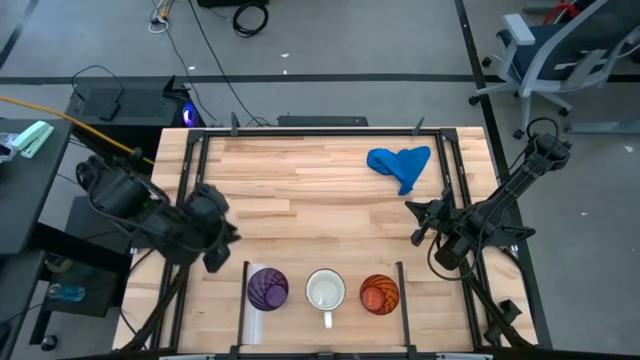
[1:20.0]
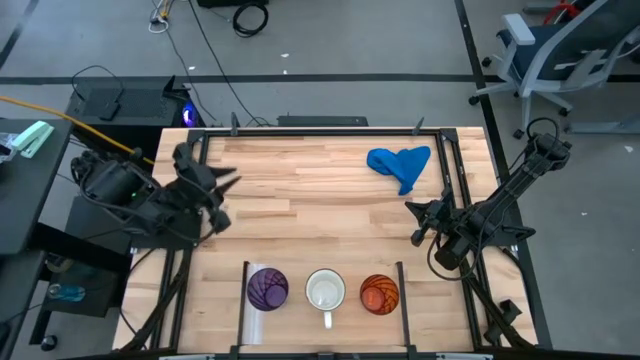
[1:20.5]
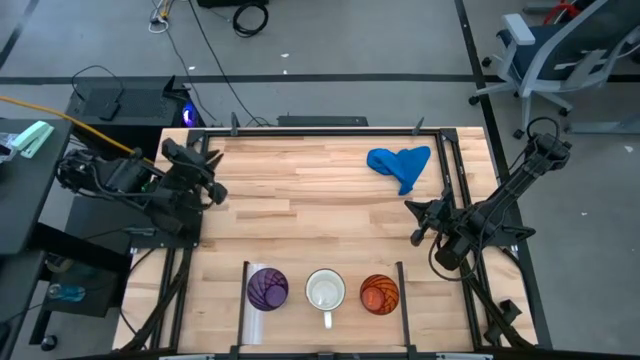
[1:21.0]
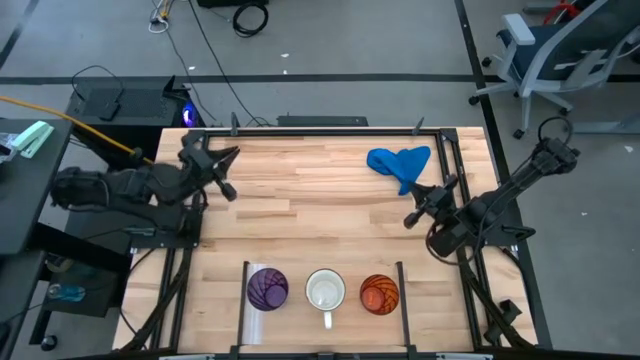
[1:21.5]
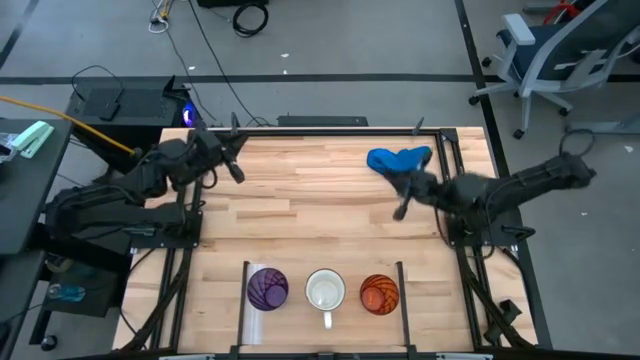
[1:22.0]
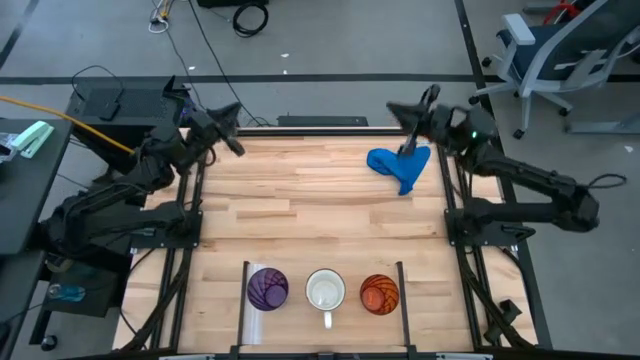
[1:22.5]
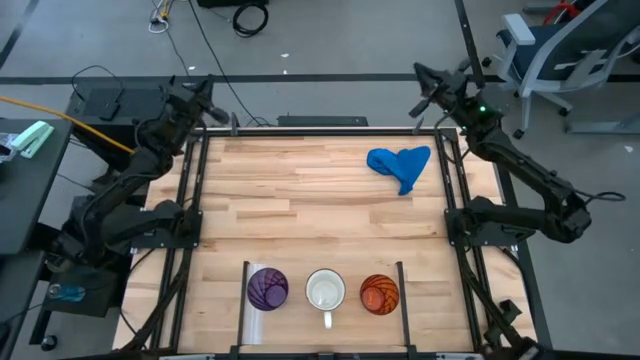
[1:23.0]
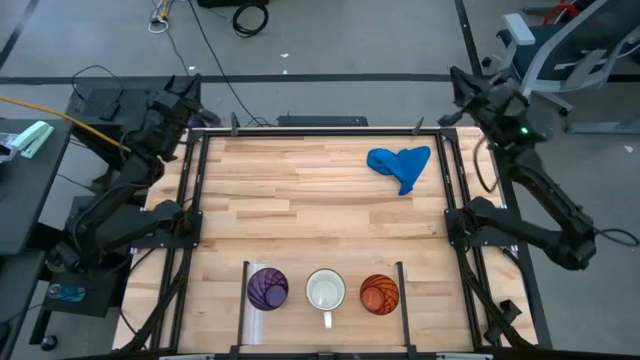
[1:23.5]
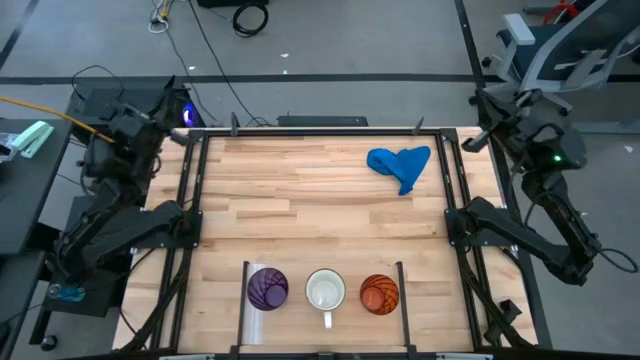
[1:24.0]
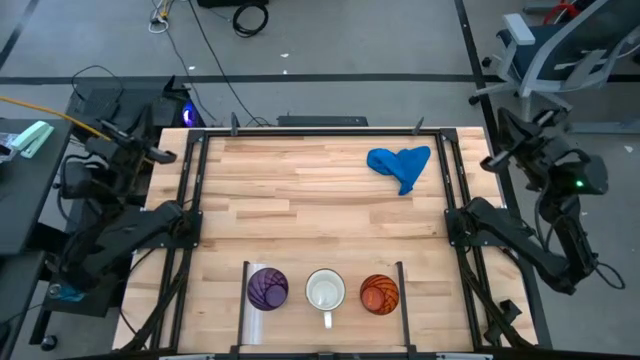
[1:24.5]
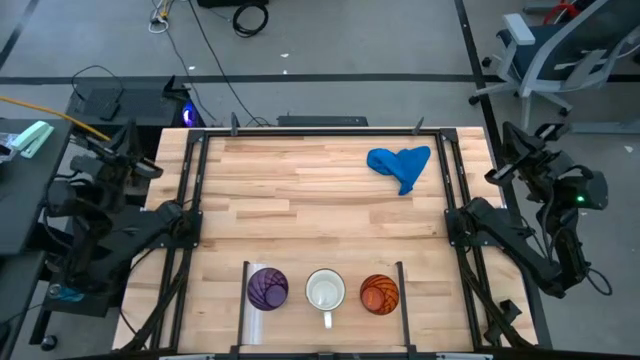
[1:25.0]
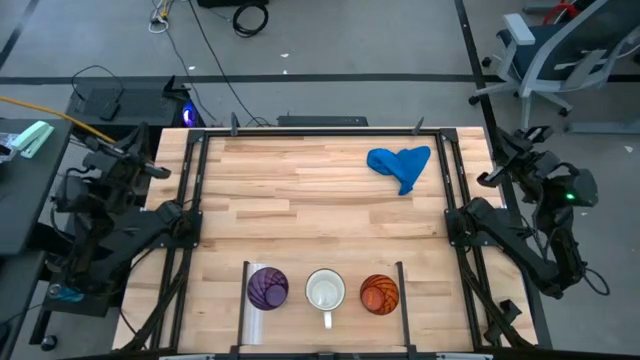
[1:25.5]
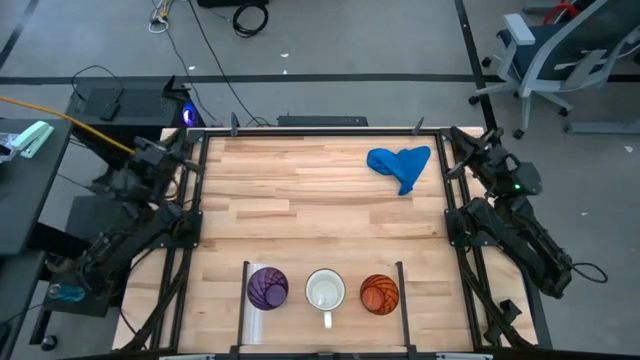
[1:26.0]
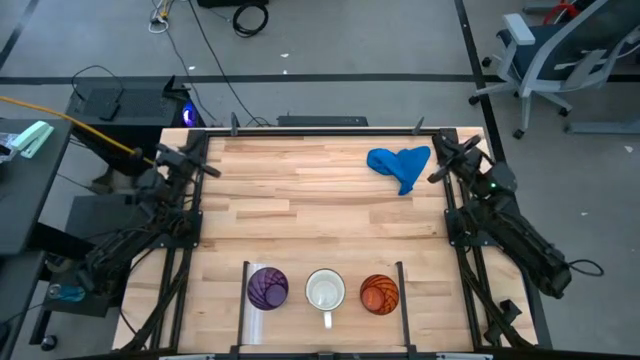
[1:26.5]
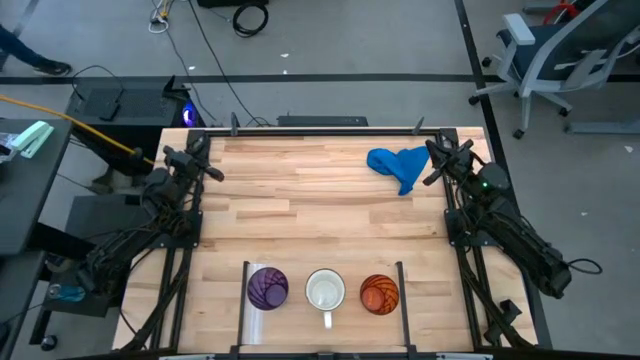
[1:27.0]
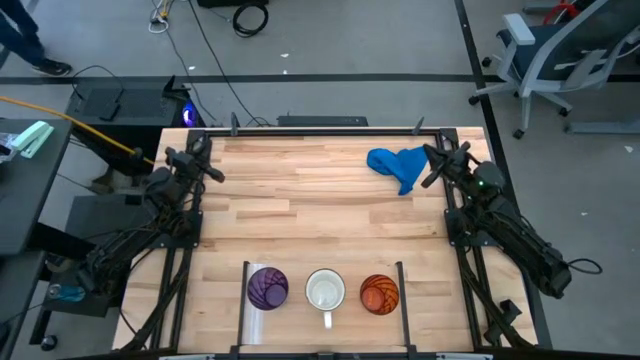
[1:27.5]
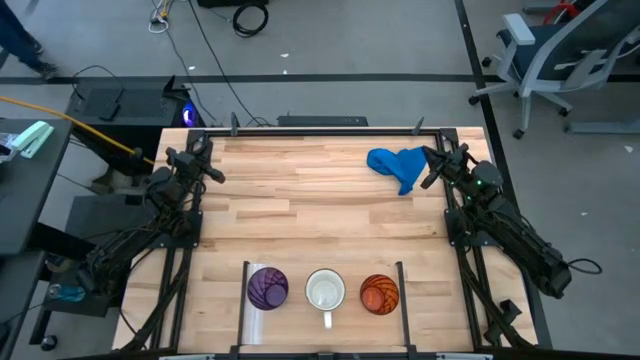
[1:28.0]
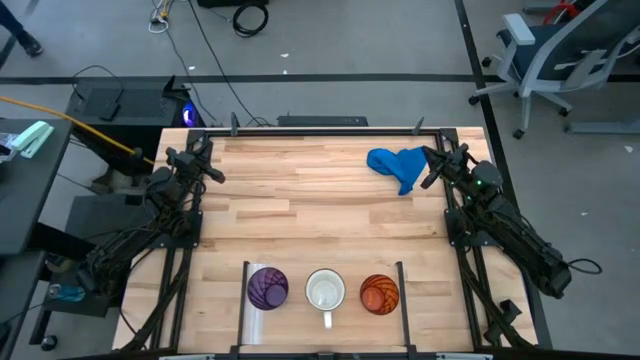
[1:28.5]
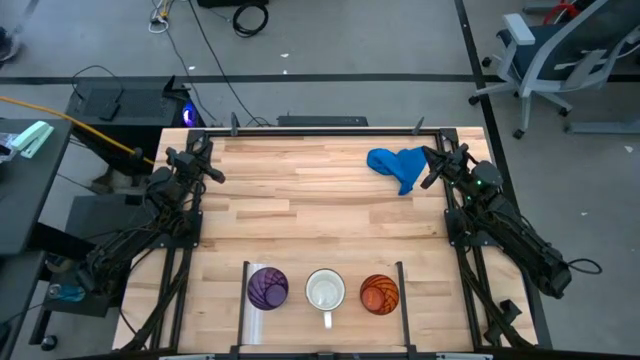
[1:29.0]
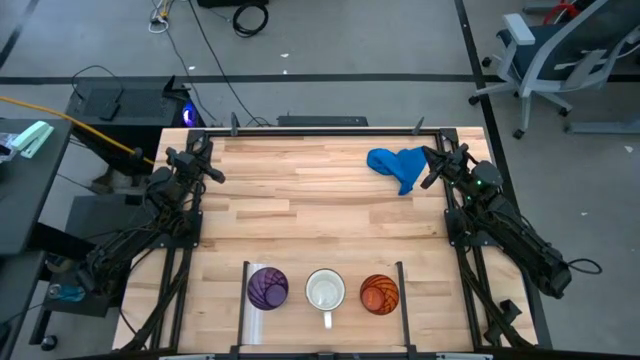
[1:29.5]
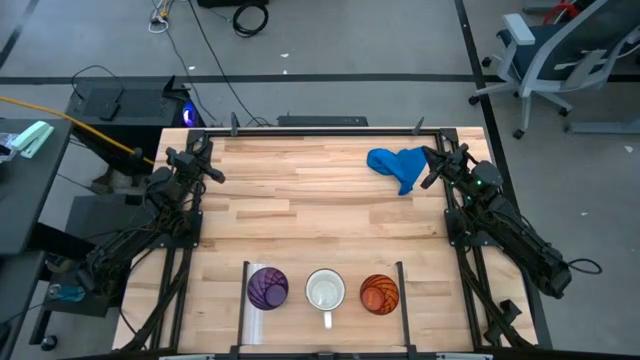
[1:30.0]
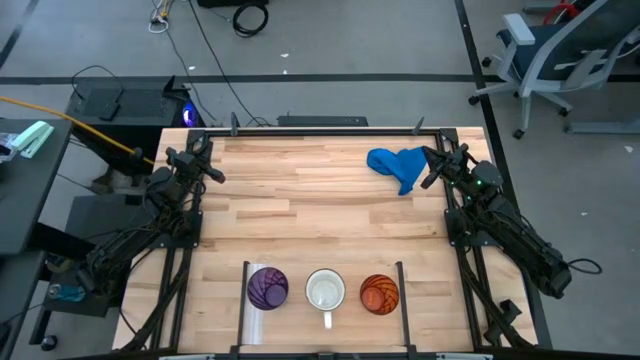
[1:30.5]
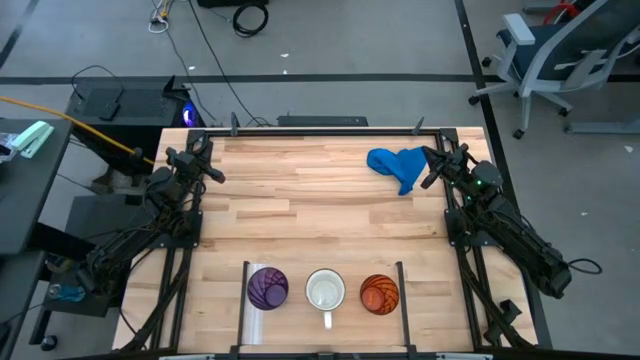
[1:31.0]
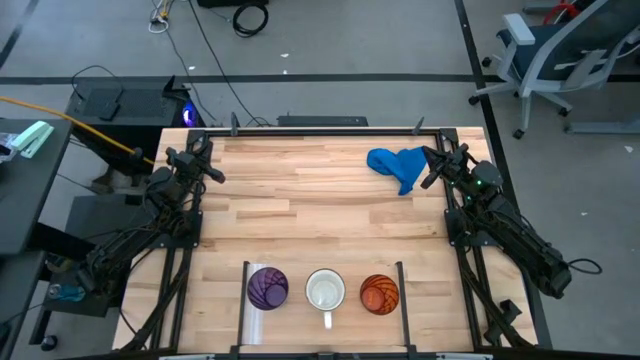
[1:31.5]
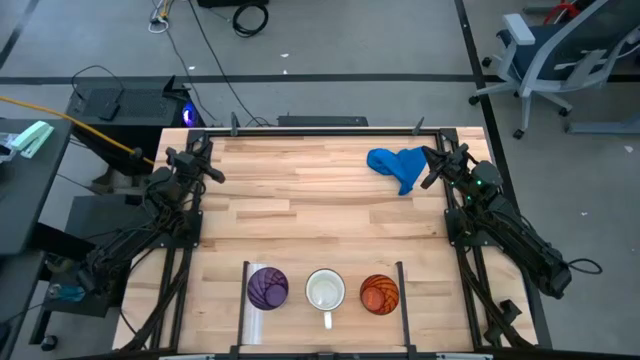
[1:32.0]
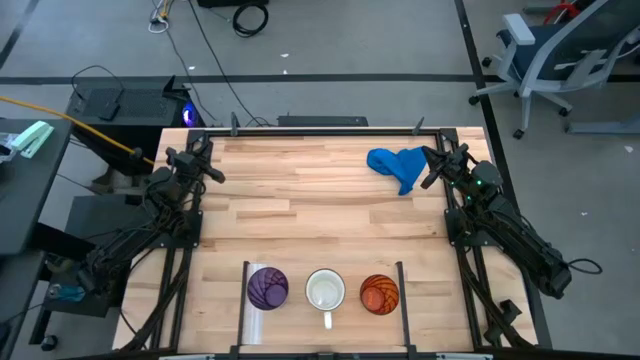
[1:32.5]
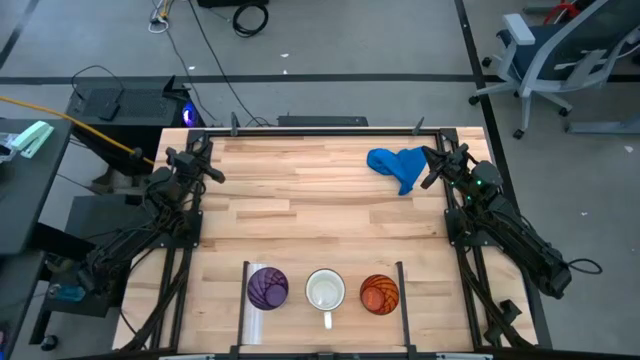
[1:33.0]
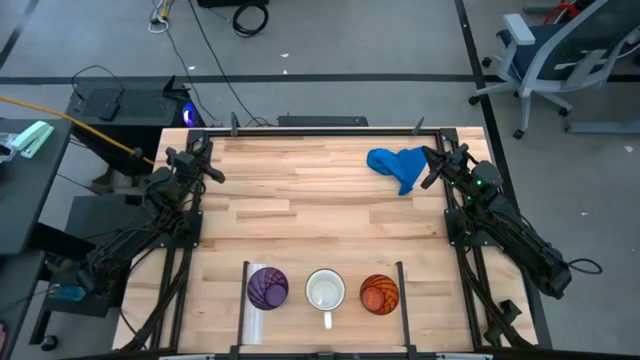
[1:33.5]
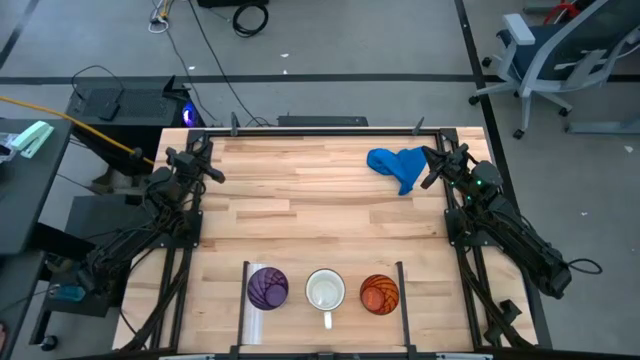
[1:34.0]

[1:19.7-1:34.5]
Task: Stack small to large cups/mugs on shelf
Return to Home Position

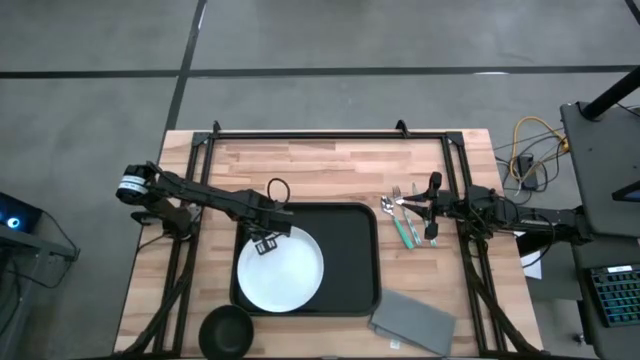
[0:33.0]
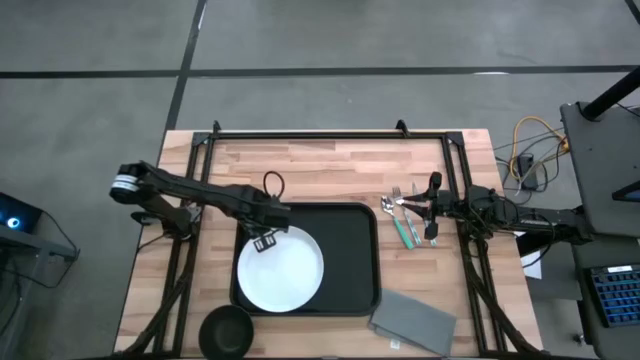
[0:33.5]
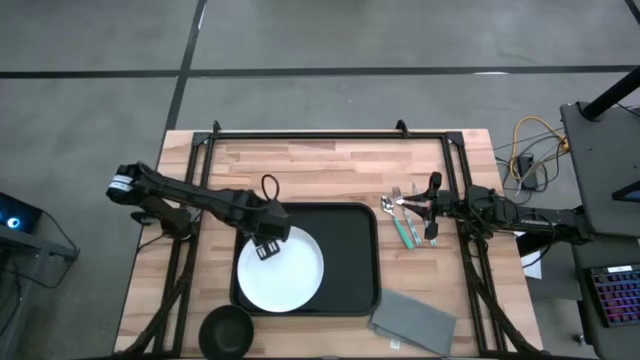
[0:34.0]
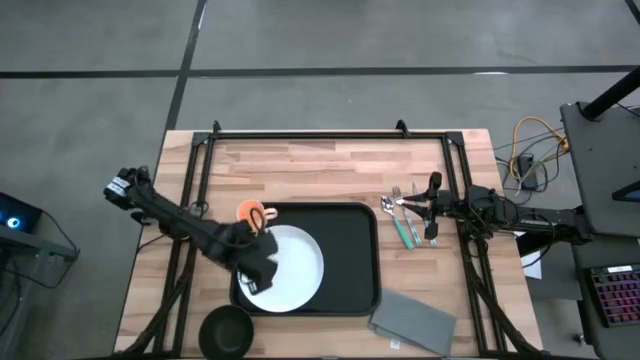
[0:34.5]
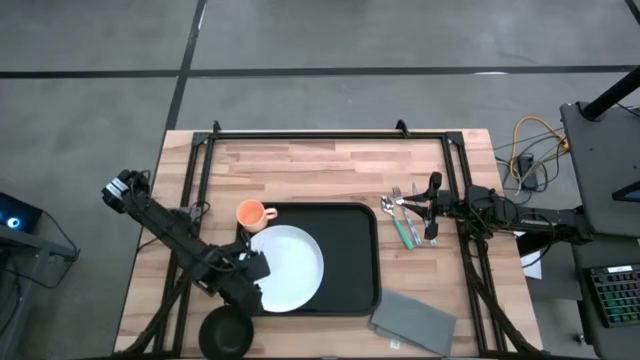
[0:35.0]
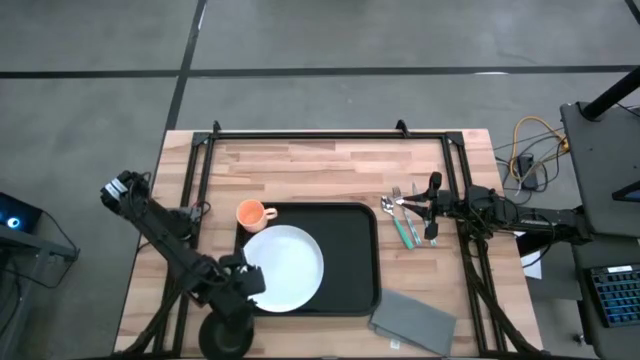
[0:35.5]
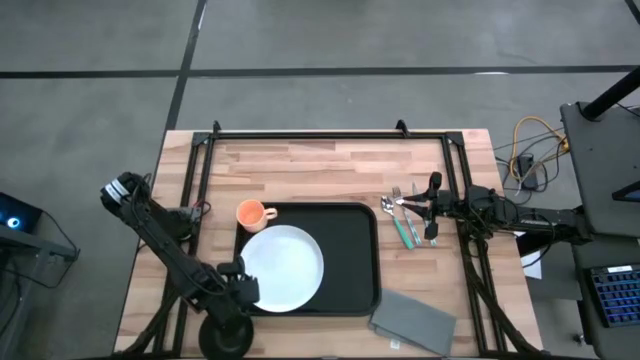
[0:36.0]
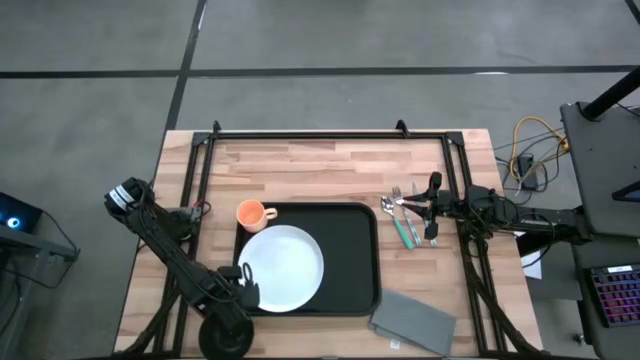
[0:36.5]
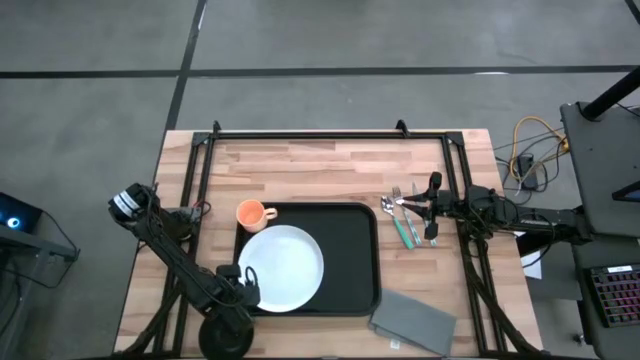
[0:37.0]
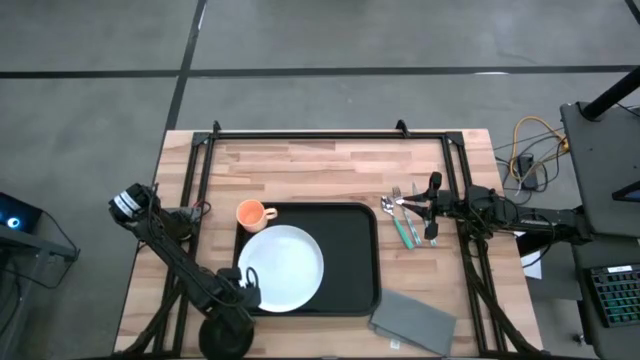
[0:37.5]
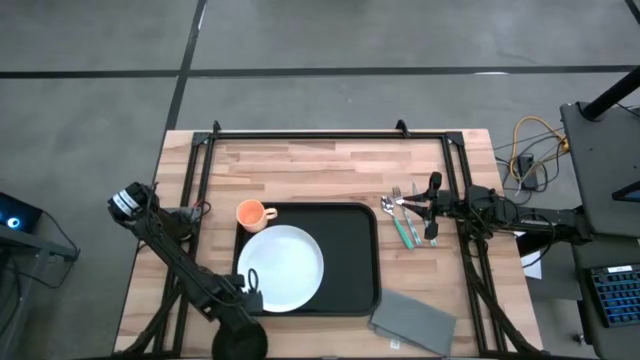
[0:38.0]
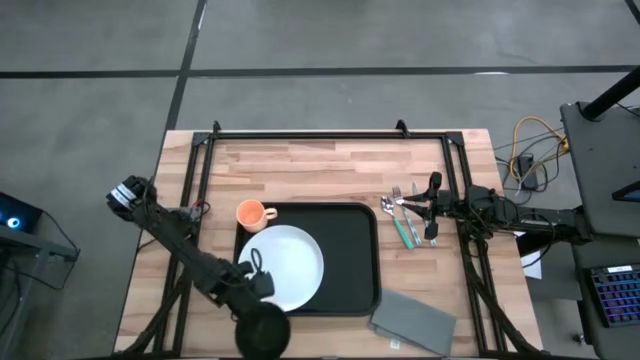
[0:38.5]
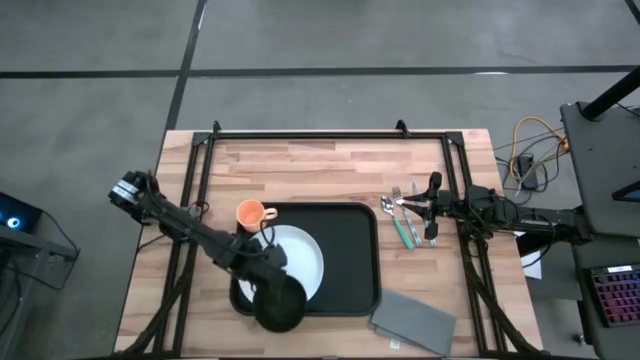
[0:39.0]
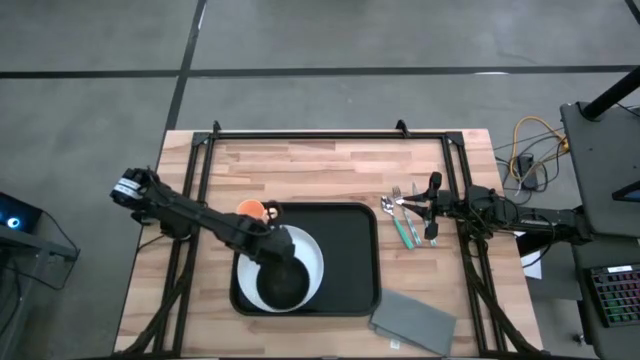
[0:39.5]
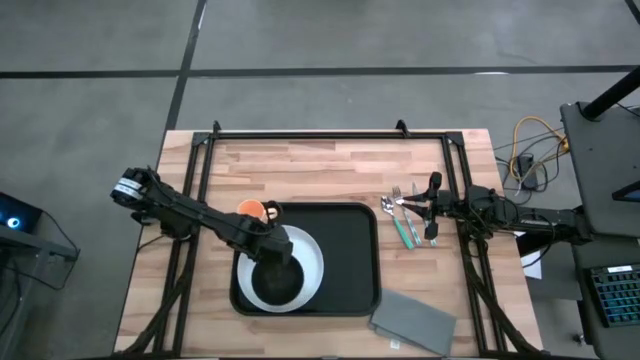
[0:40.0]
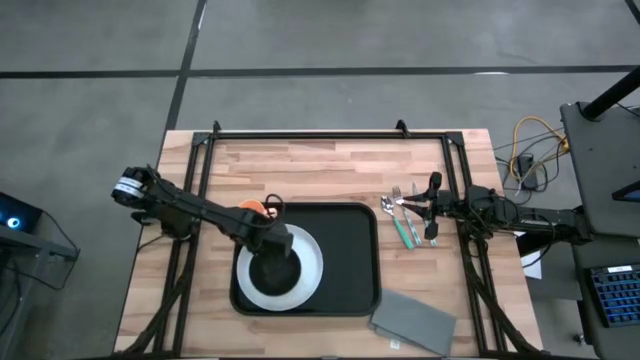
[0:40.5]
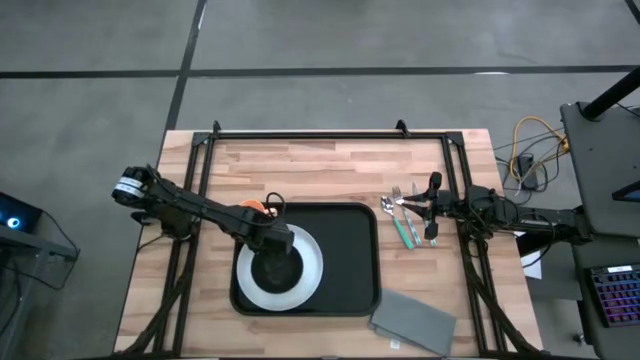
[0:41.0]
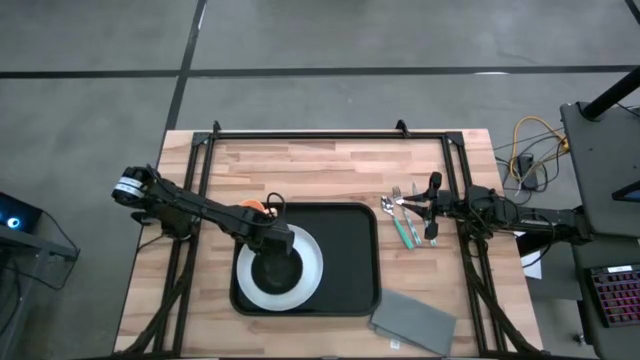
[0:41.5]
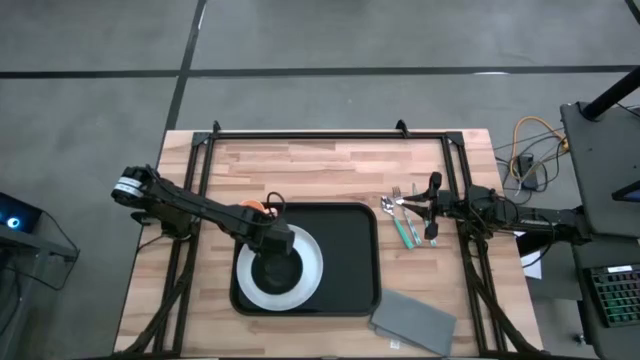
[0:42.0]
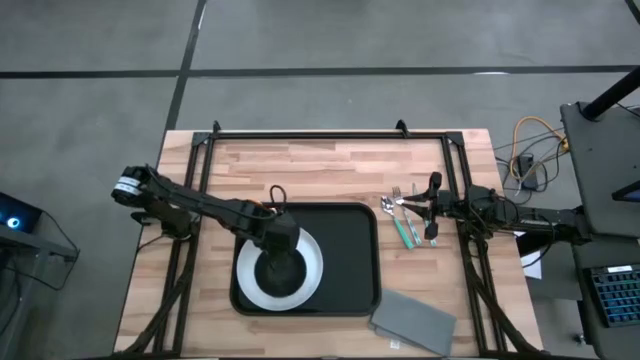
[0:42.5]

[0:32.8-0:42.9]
Task: Set up tray
Put the black bowl on top of the white plate on the black tray
